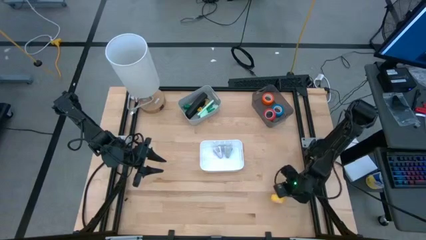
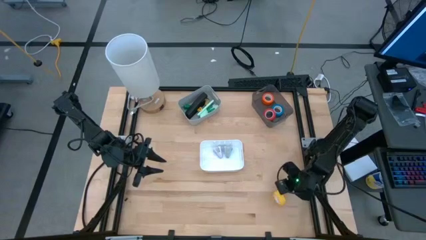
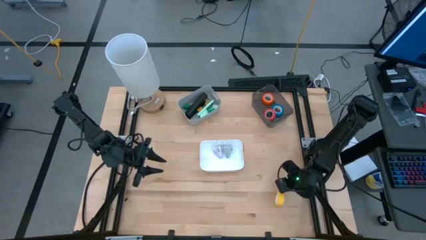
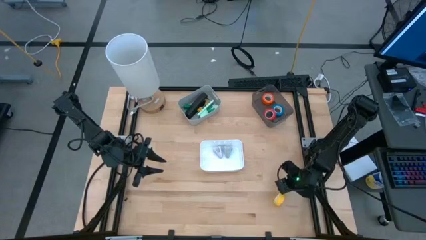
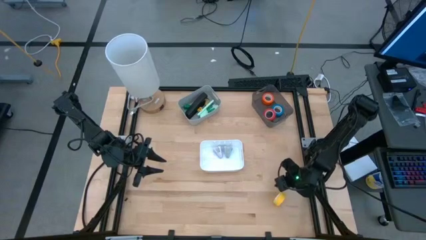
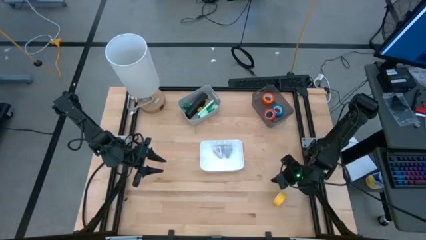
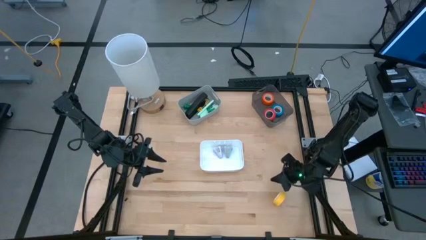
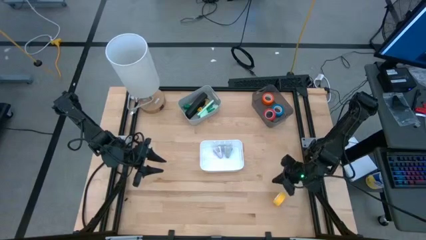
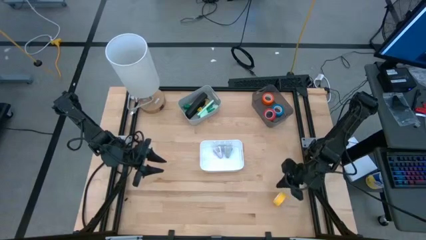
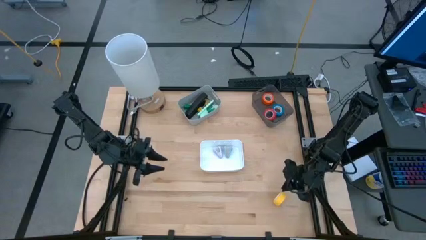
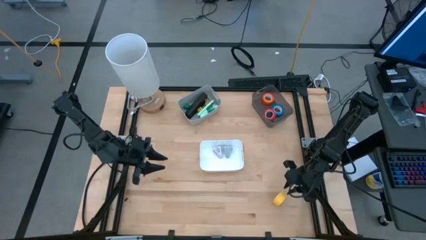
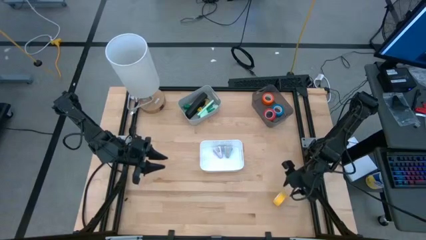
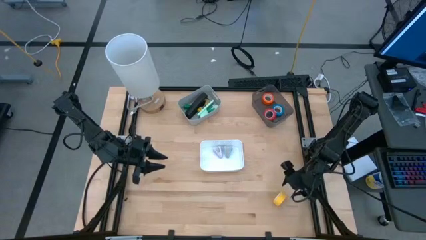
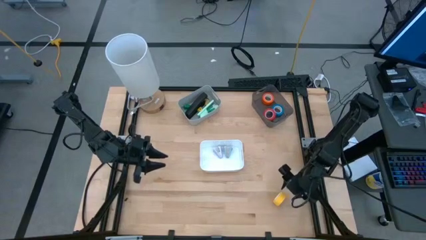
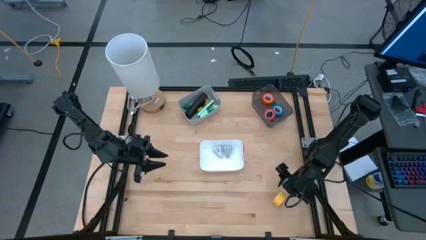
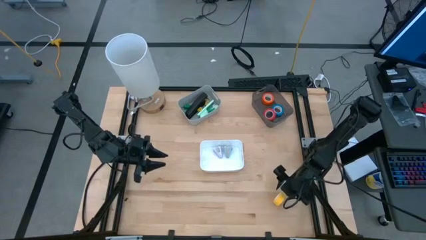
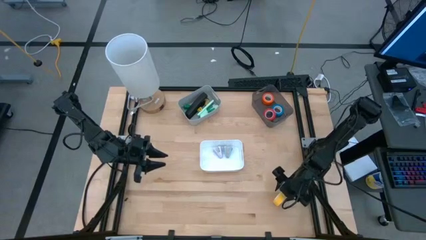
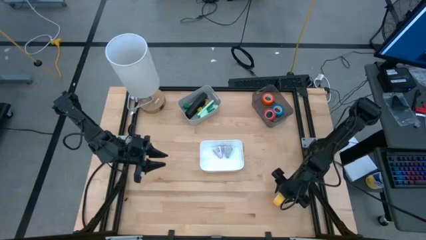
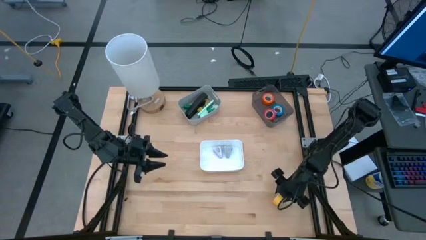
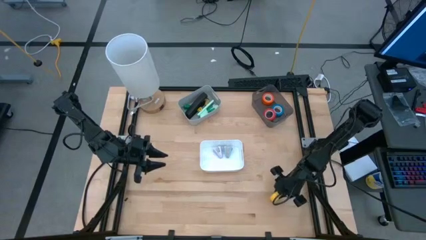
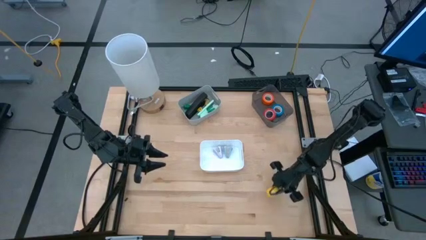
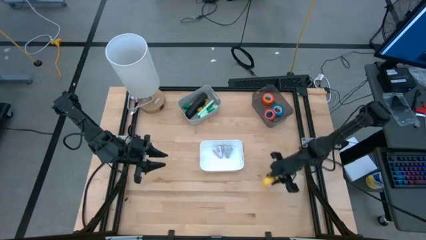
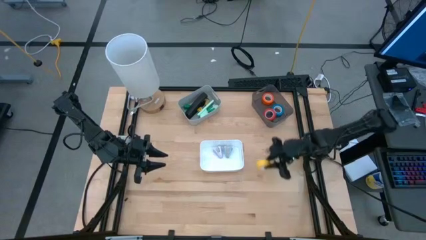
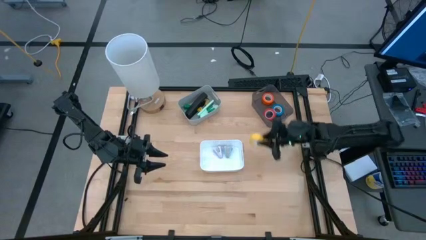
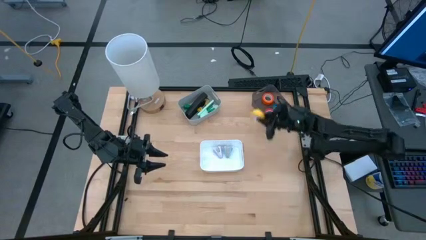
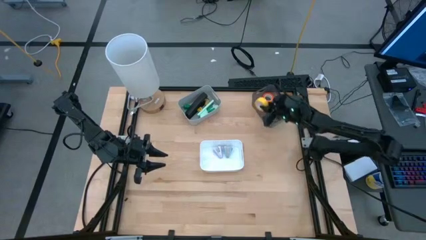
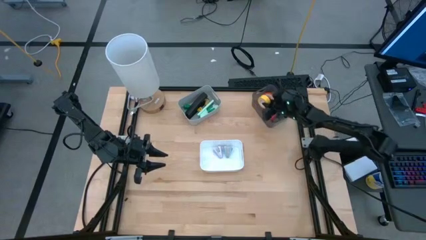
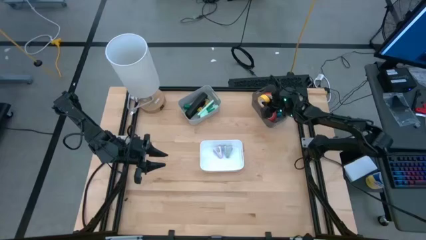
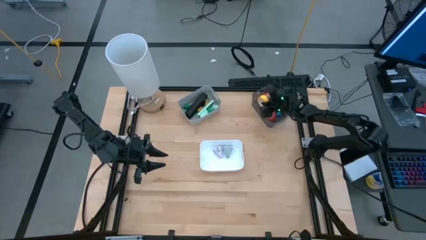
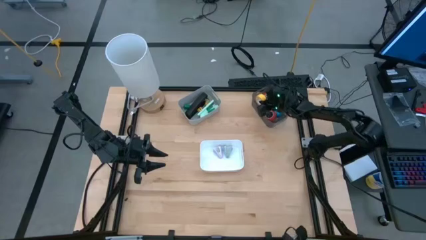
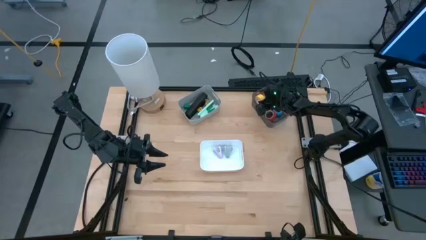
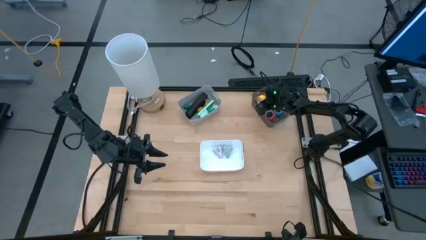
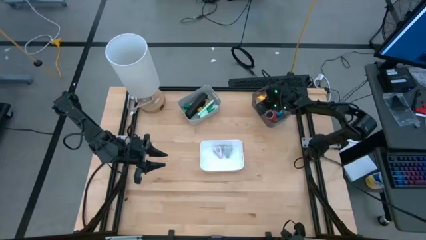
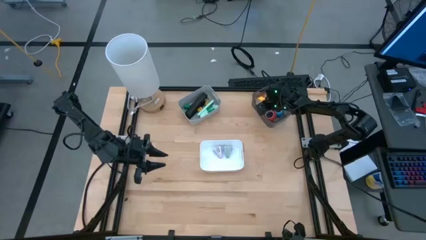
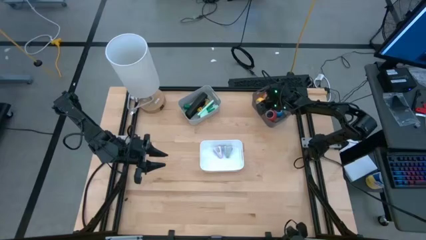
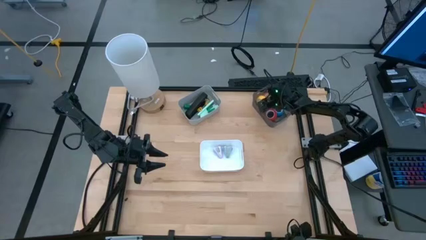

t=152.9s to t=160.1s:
Task: Pick and place Stapler, Stapler remover, tape
Put the yellow tape into the black bin

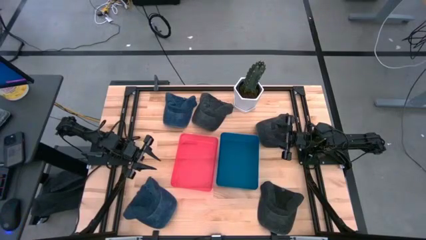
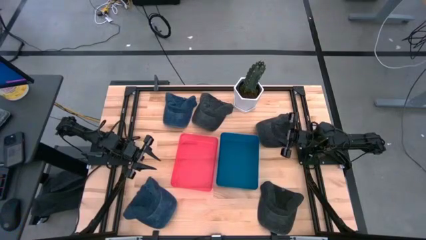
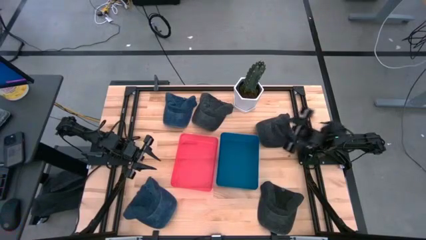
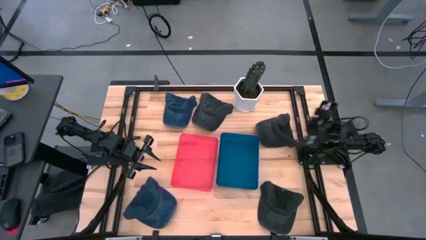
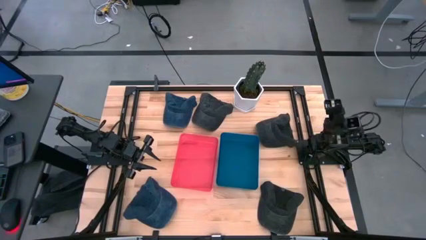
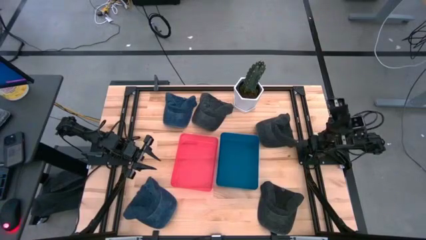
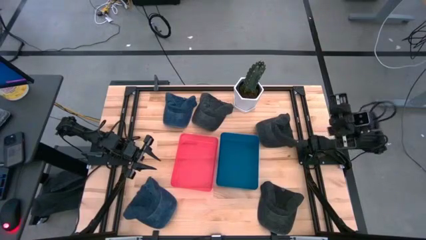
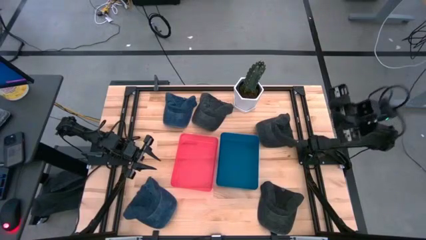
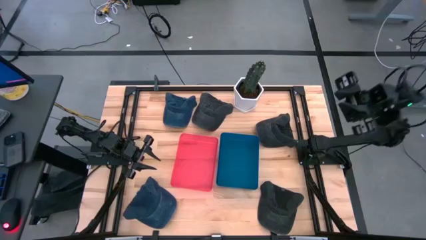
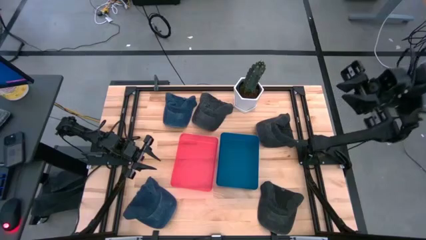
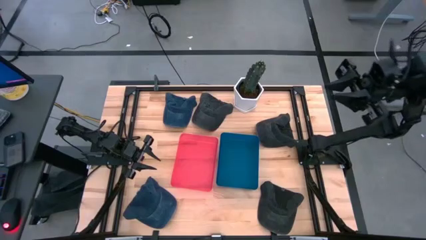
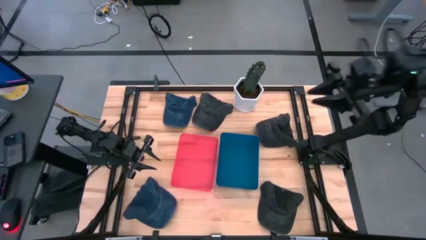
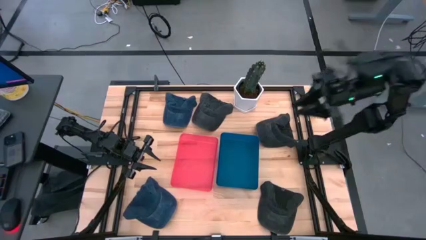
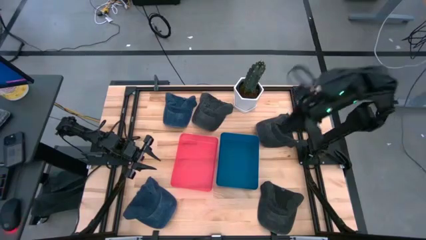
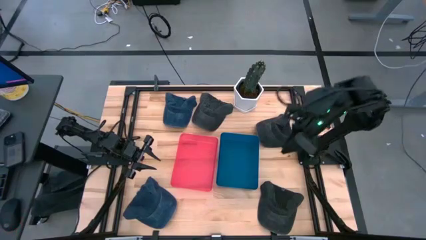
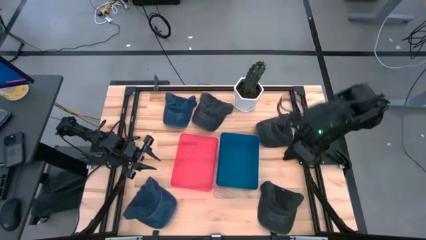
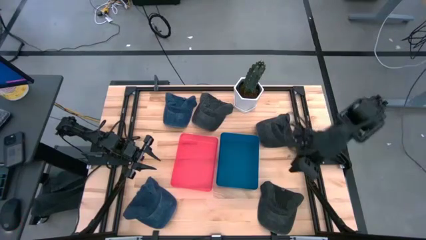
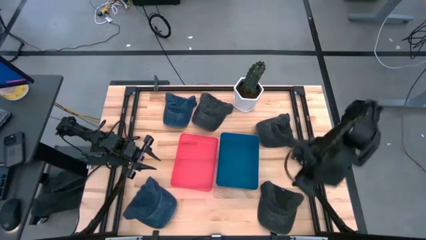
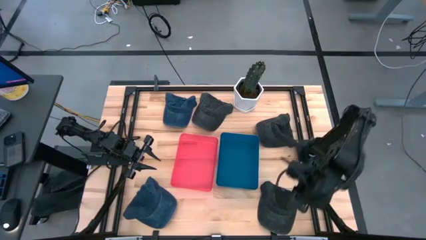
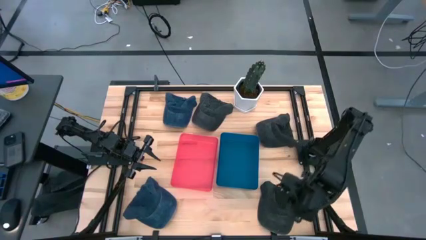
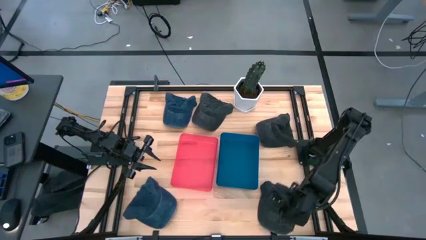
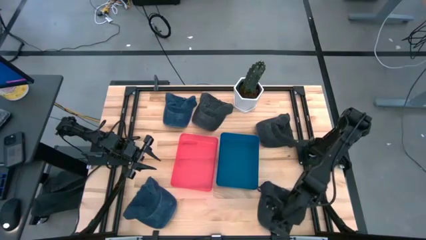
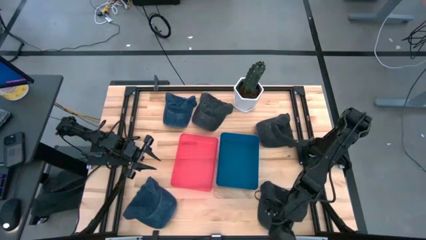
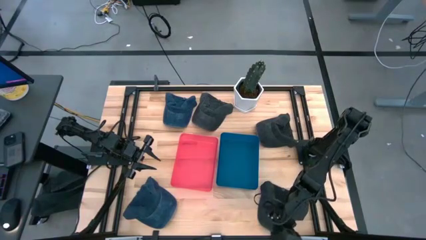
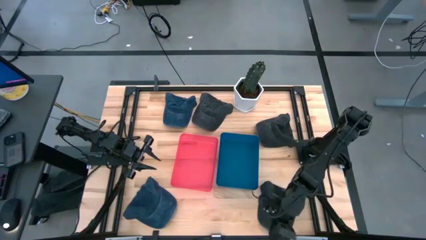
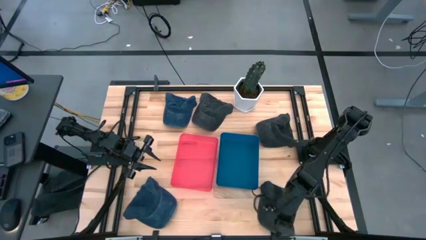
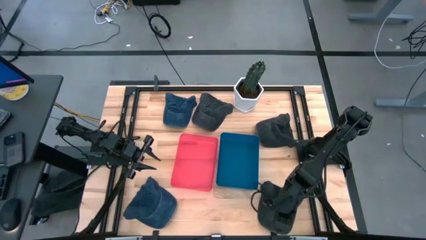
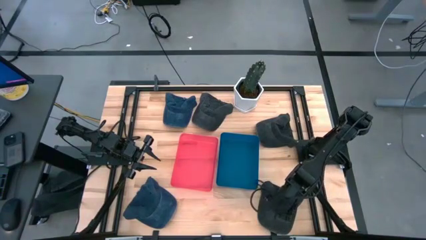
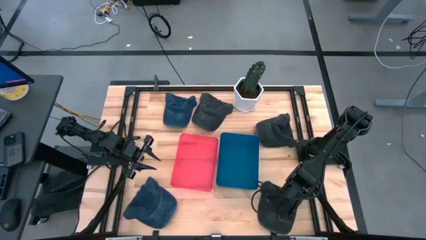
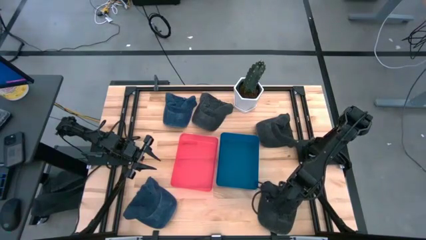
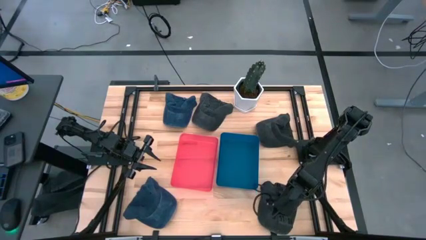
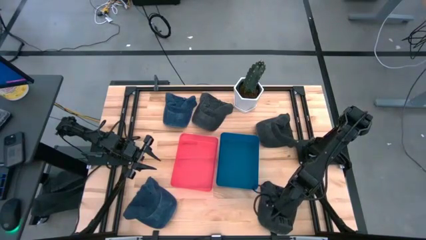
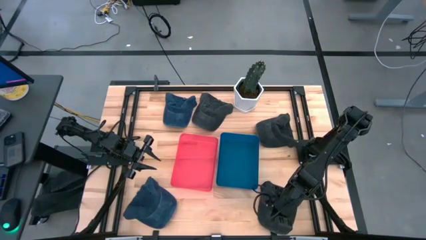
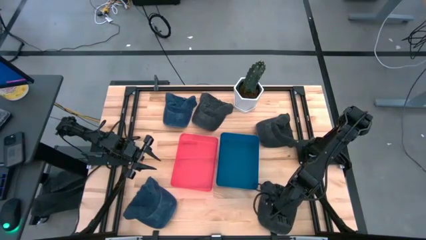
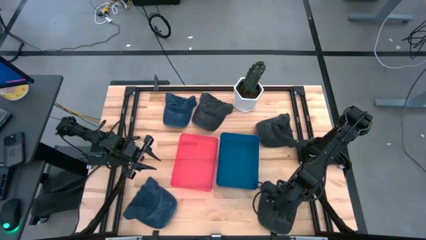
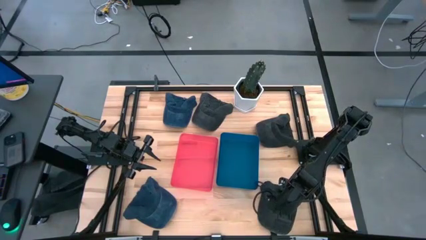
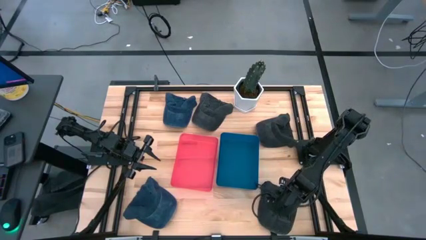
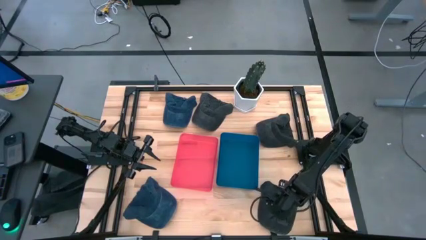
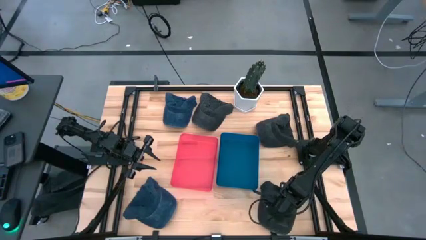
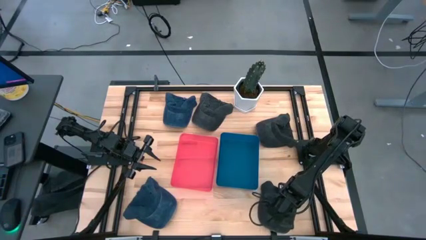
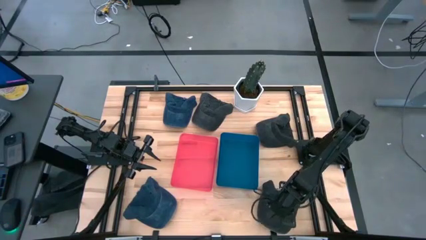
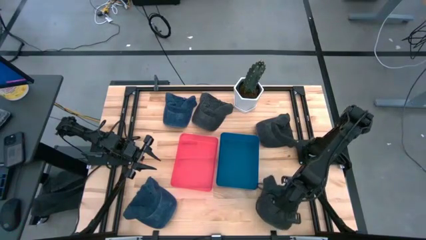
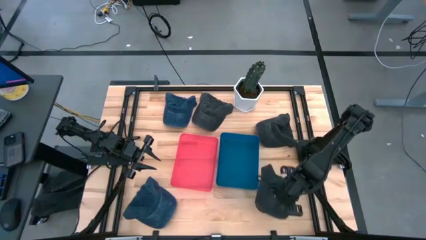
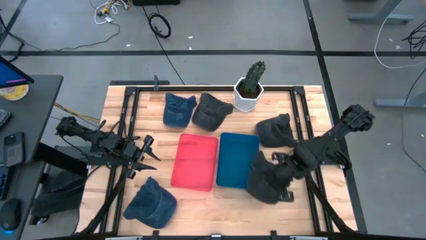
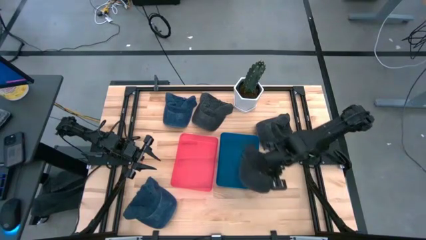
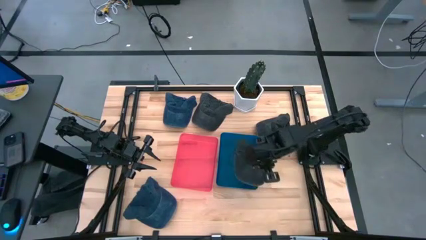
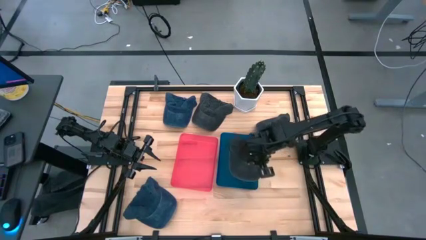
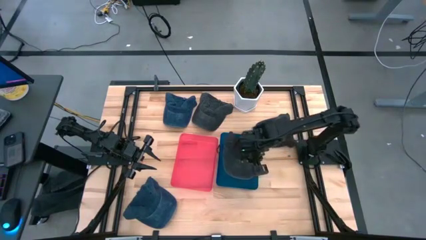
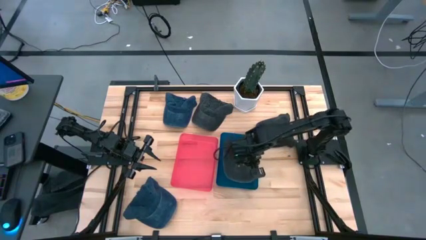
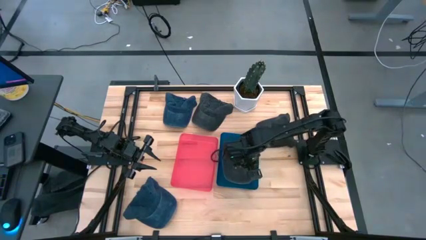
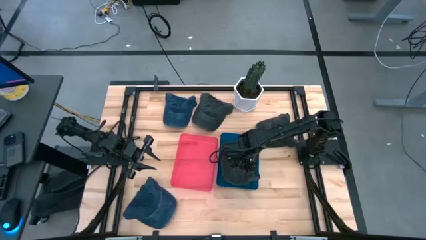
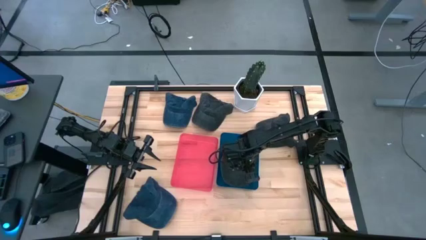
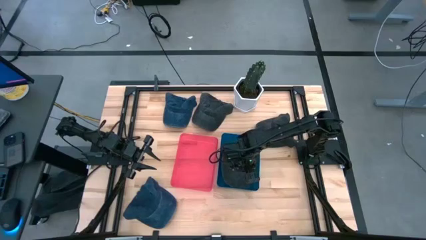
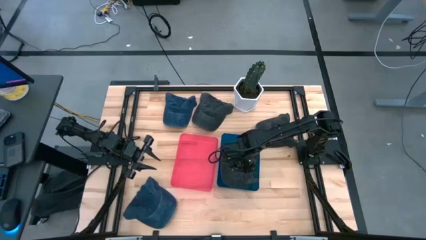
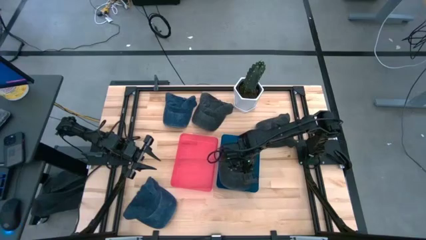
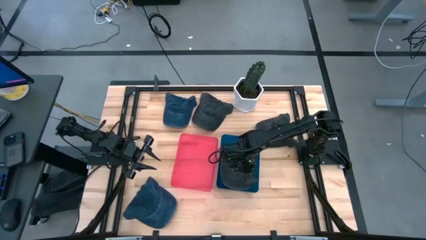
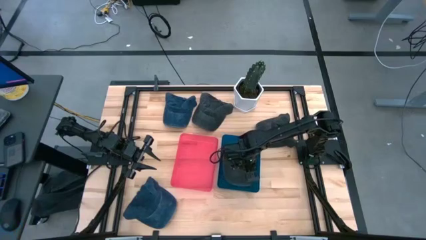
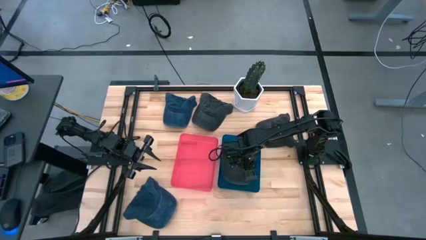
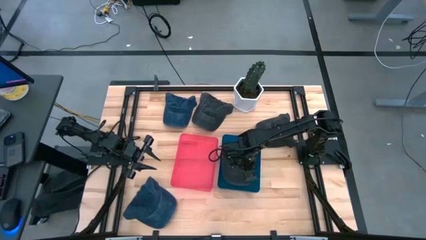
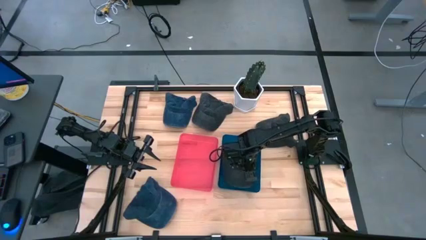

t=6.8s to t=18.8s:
Task: Pick & Place hat
Put the bottom black cap into the blue bin
